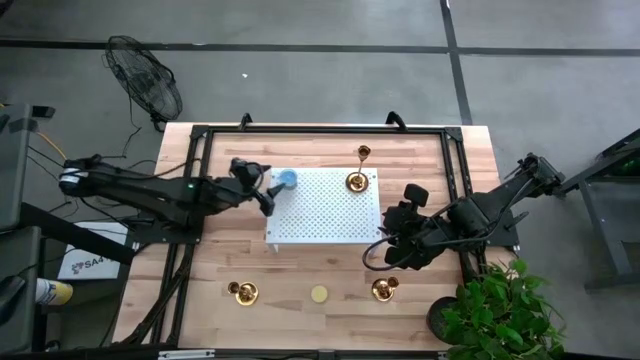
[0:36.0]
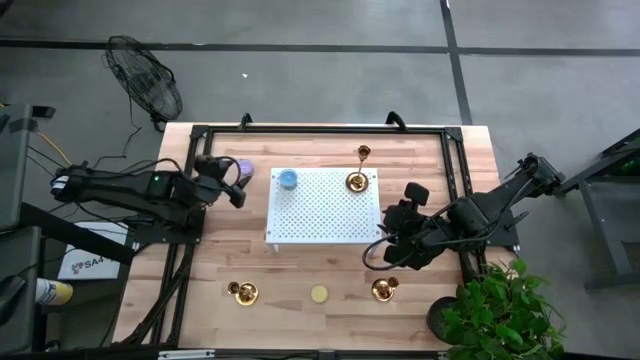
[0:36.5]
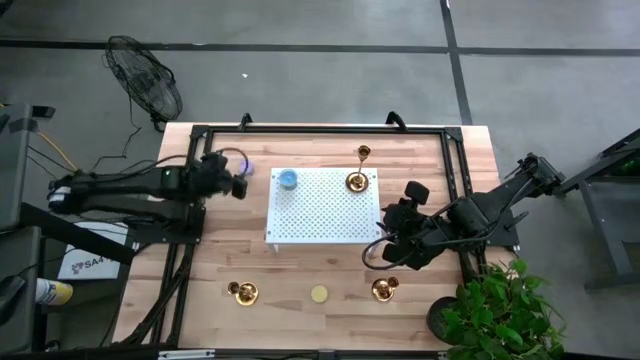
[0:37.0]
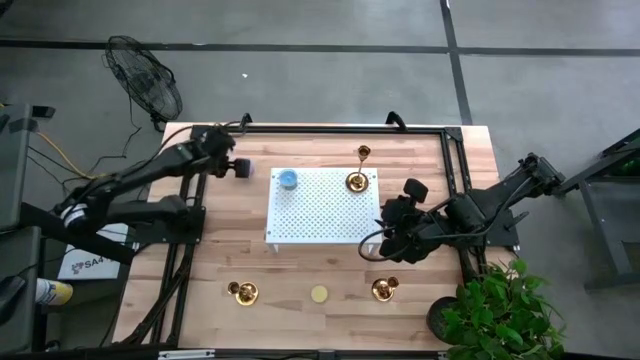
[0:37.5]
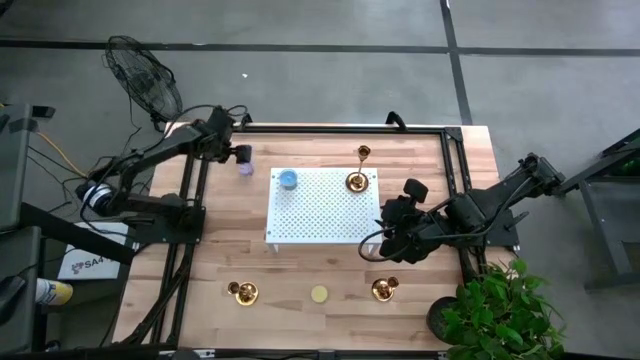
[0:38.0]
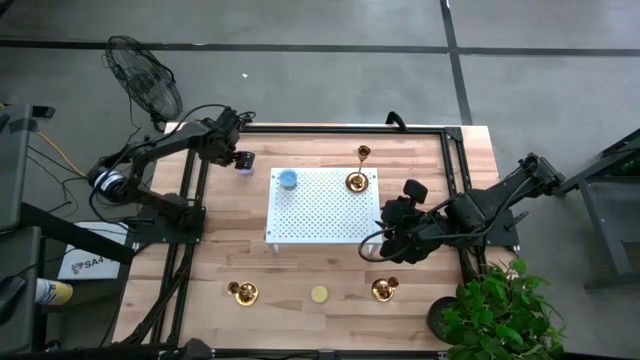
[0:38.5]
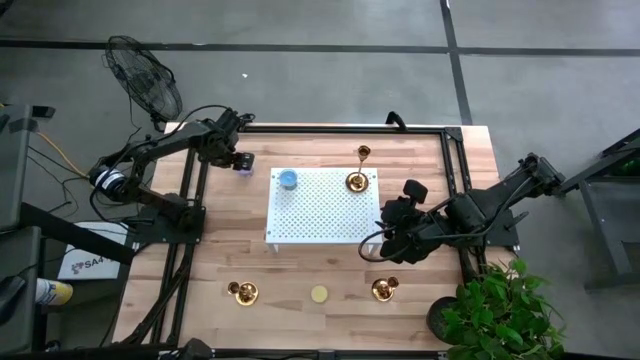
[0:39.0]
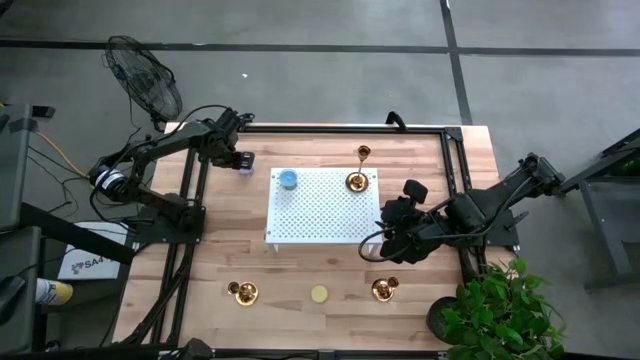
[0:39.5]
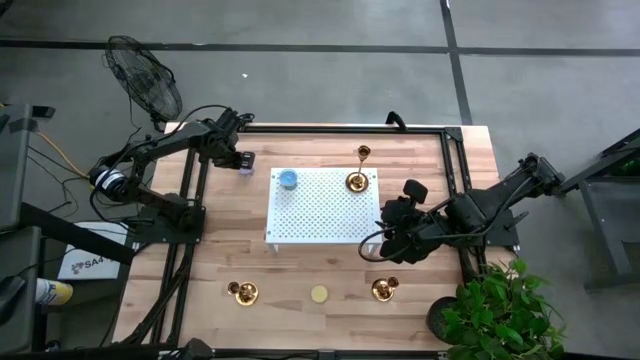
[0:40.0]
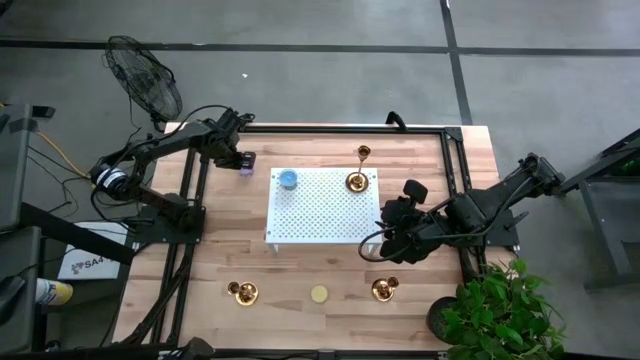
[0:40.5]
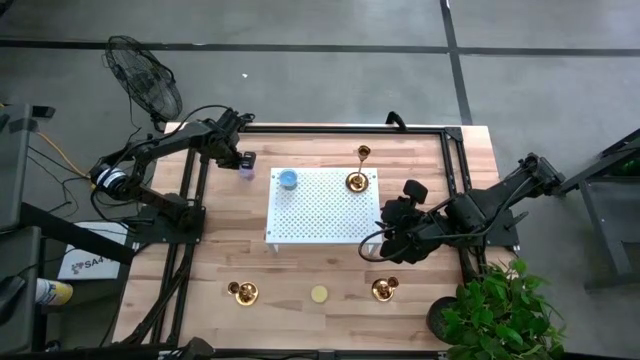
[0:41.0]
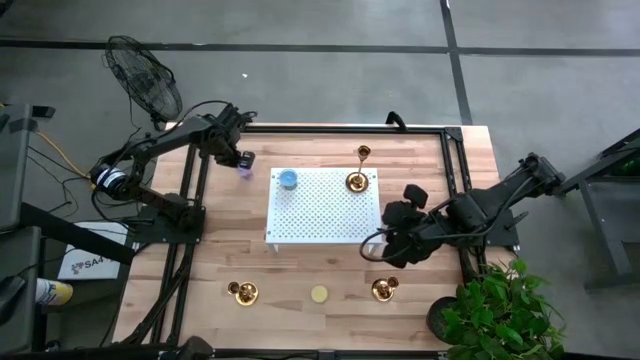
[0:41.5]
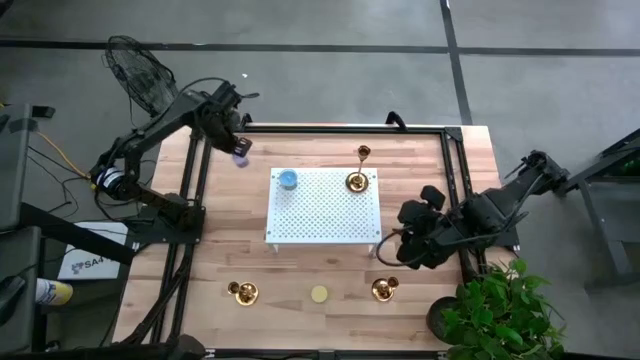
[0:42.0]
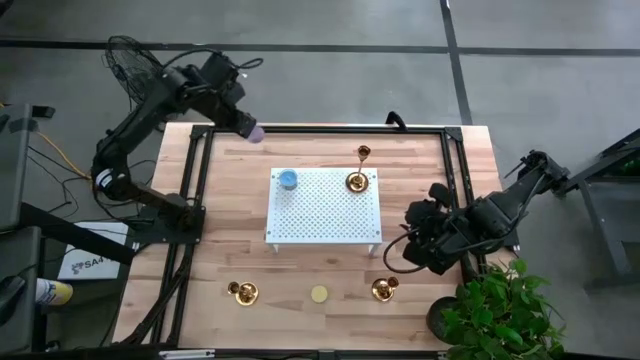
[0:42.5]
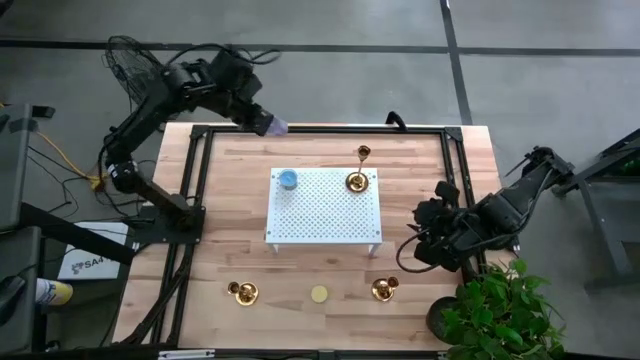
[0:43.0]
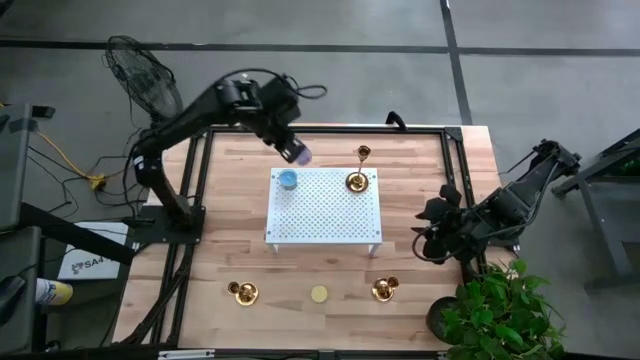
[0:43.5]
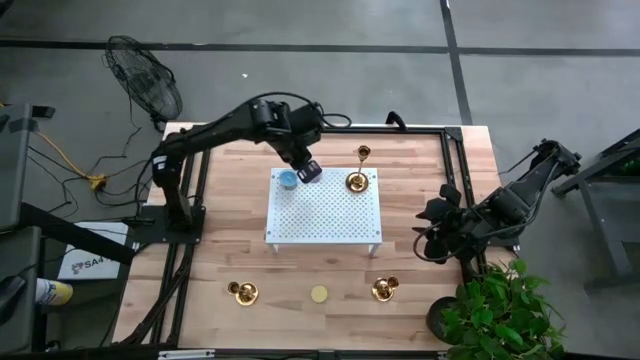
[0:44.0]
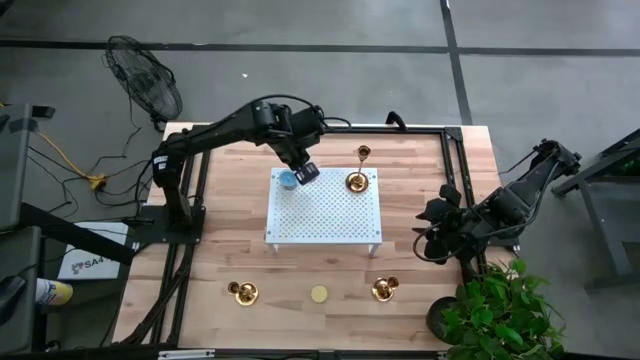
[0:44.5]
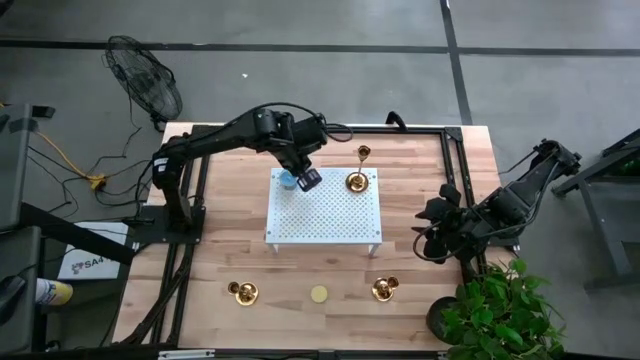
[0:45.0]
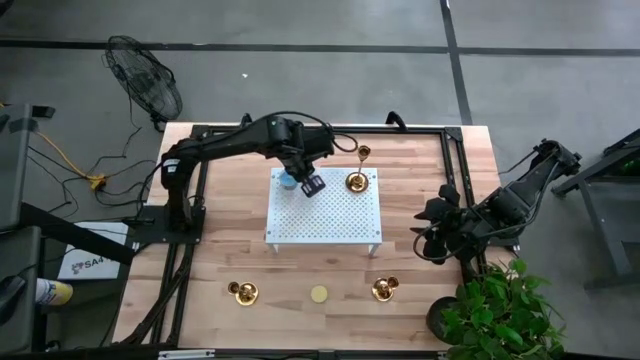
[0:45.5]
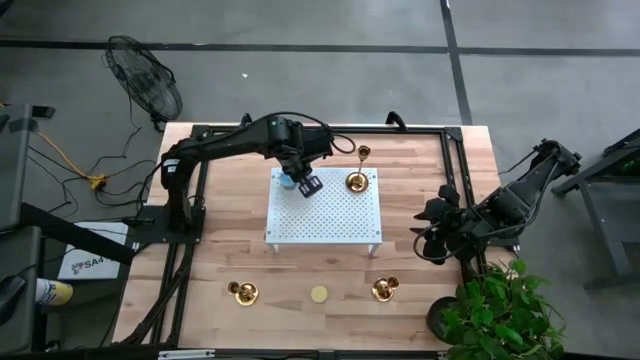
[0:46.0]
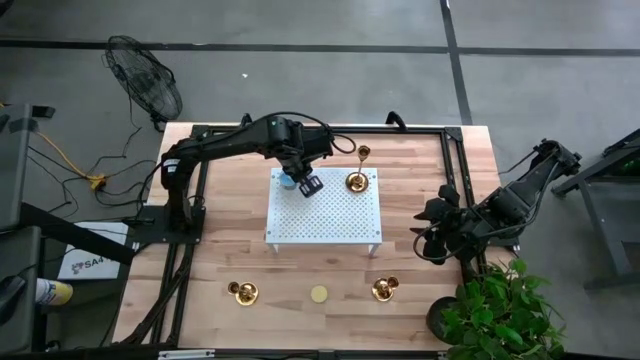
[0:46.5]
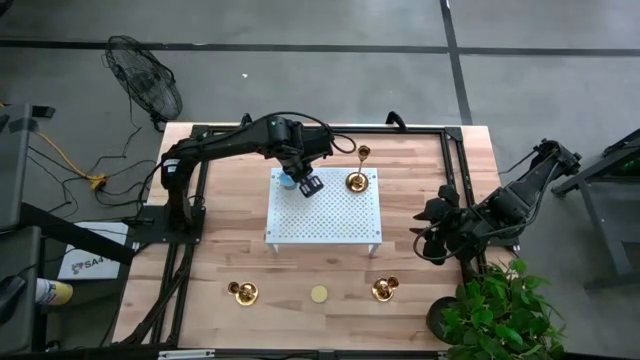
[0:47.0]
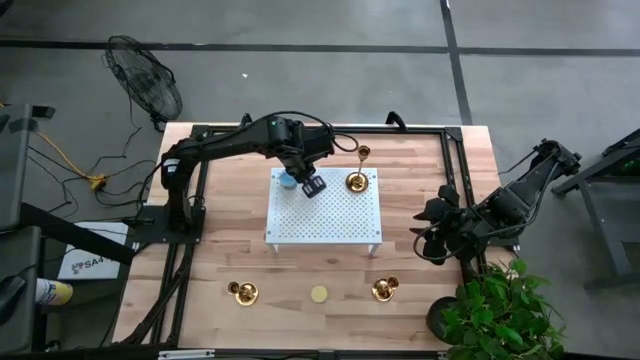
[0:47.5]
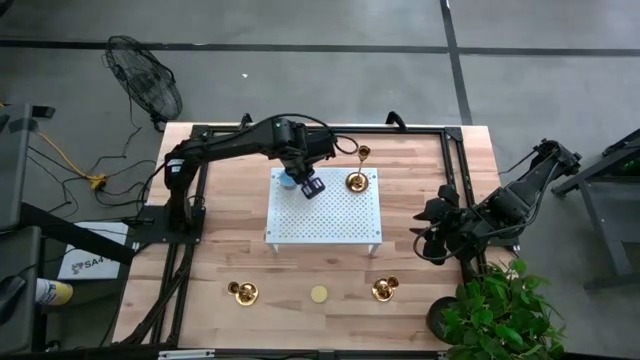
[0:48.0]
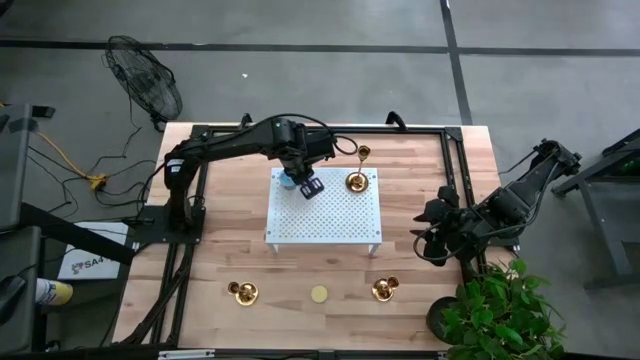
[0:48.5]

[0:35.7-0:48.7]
Task: Pick & Place candle stick holders
Put the purple scented candle on the shelf

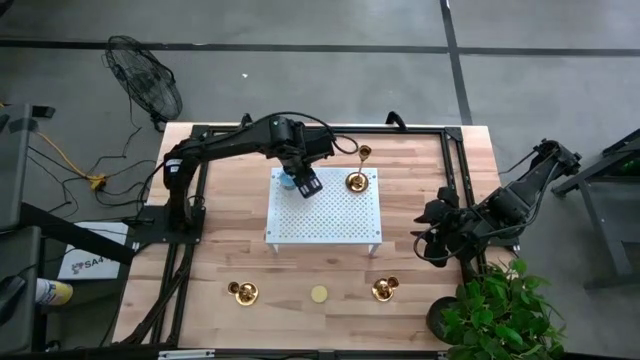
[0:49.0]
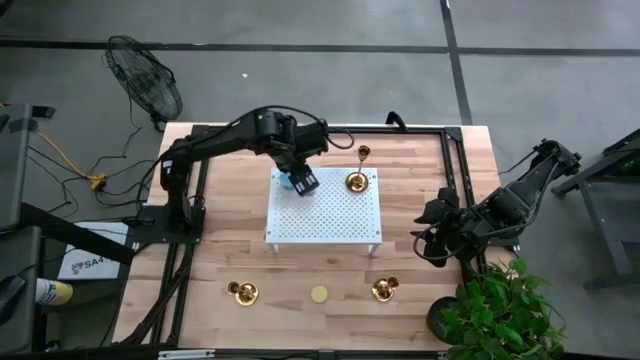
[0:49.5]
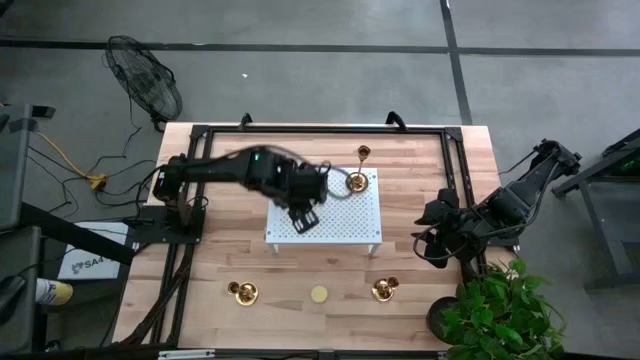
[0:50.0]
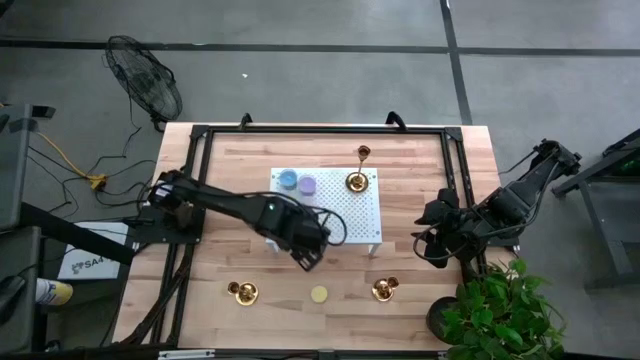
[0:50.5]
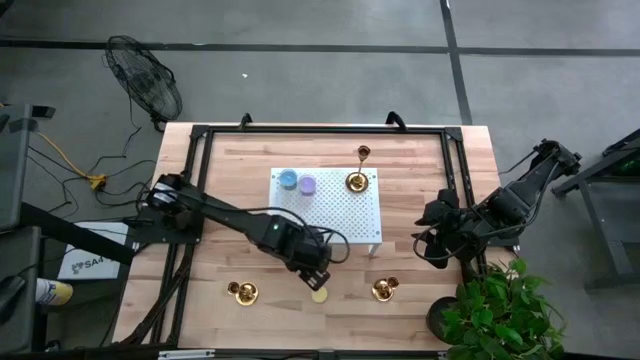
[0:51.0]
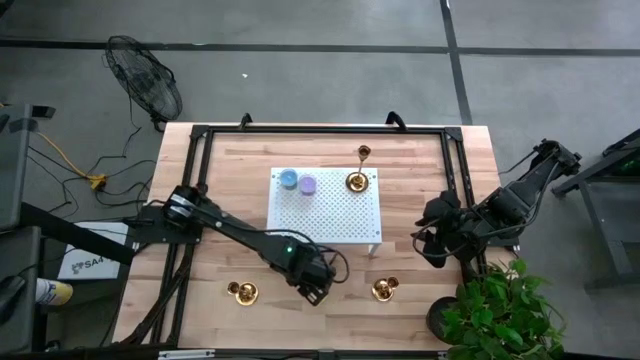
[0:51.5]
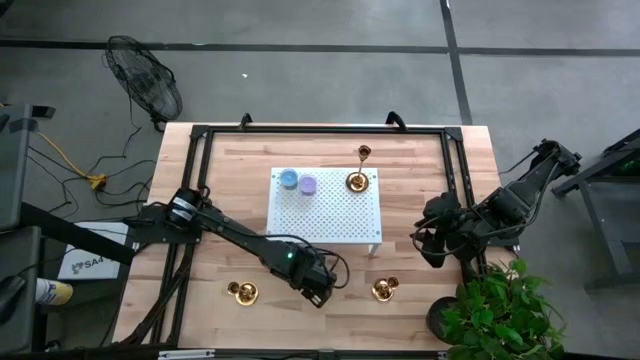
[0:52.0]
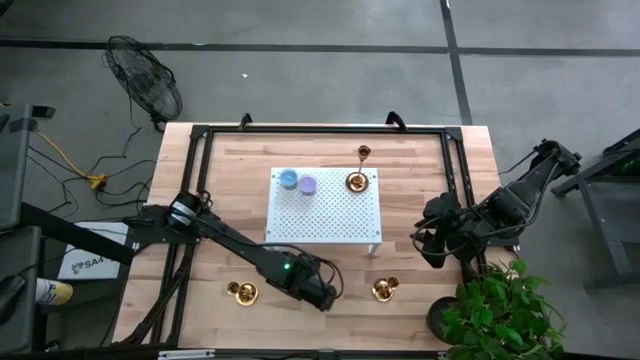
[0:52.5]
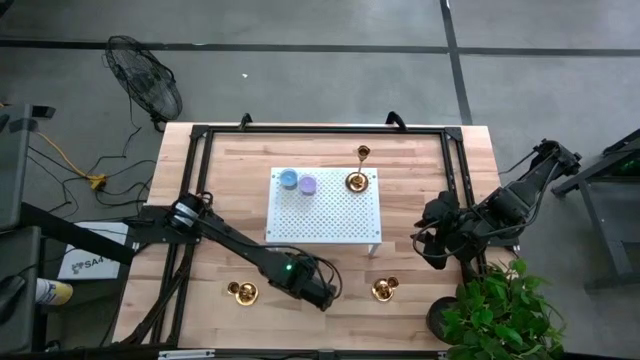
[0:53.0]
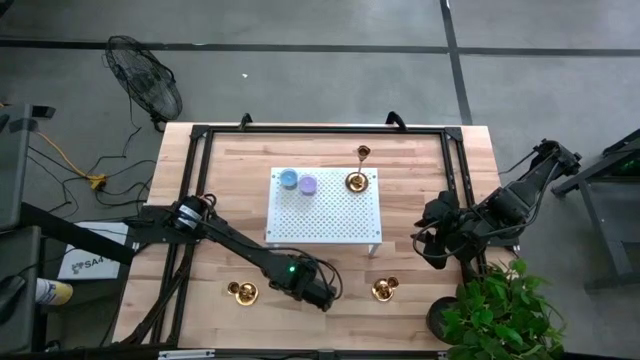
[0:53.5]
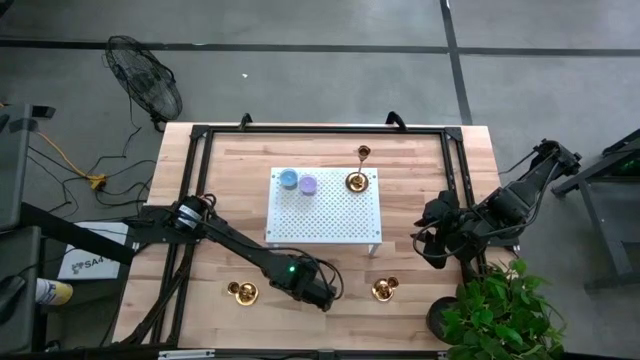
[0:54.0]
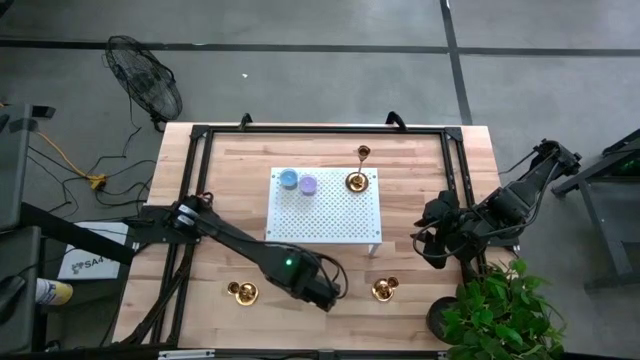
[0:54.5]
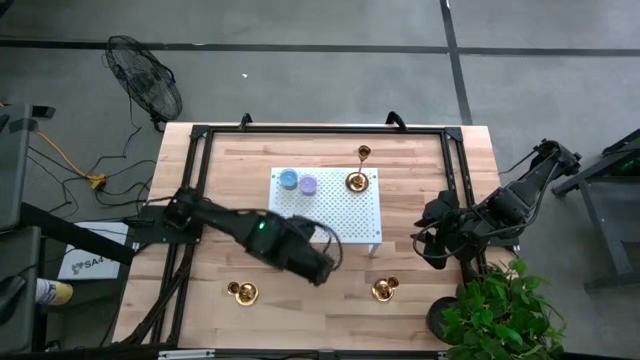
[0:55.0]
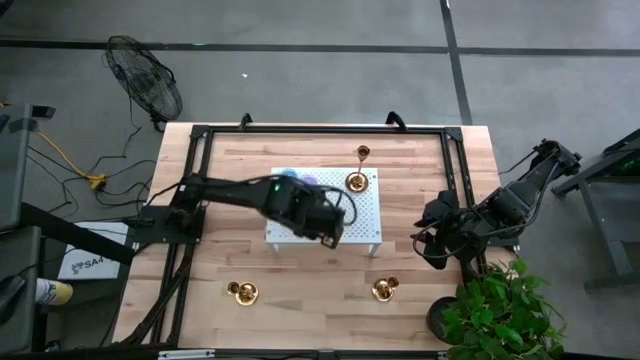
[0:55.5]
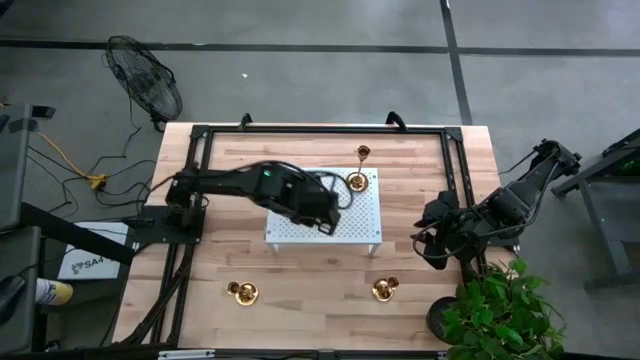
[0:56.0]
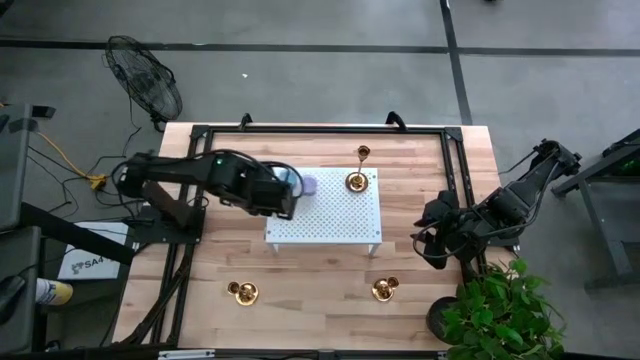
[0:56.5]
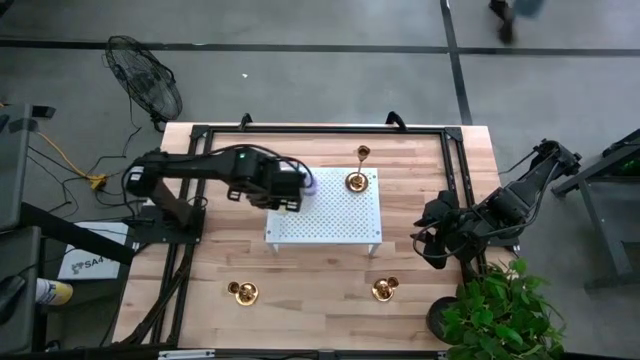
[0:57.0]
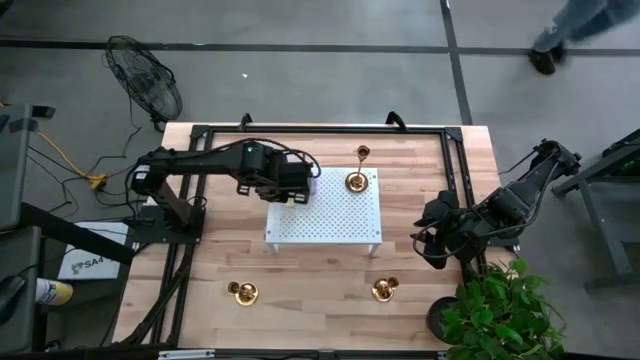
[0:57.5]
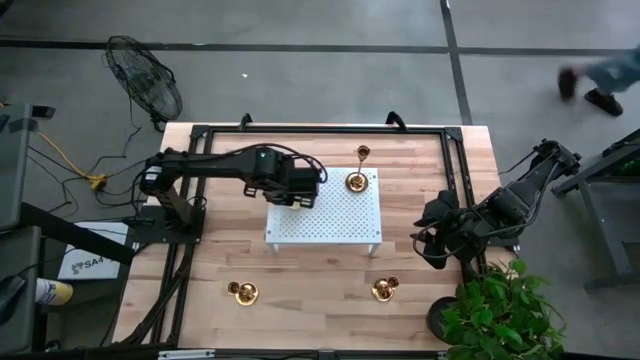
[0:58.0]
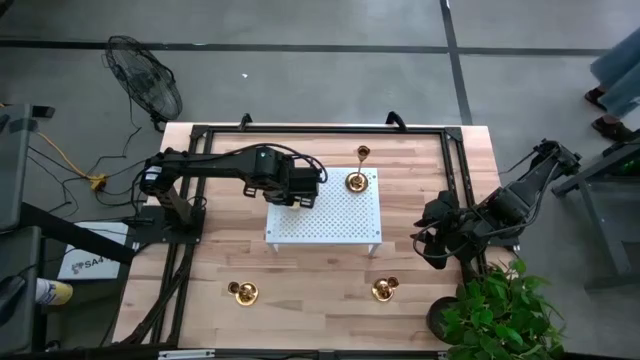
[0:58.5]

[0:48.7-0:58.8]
Put the yellow scented candle on the shelf
